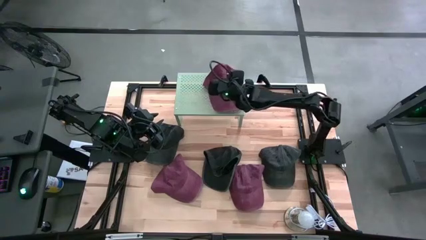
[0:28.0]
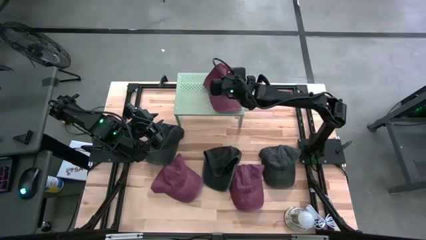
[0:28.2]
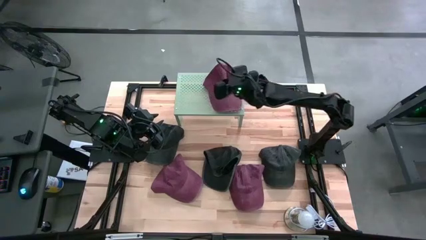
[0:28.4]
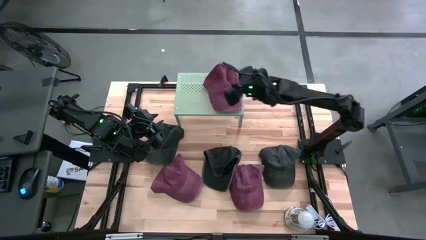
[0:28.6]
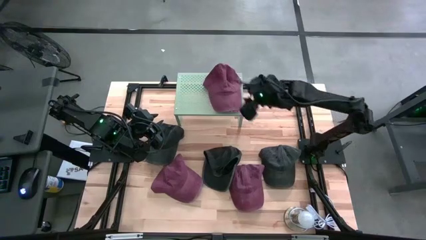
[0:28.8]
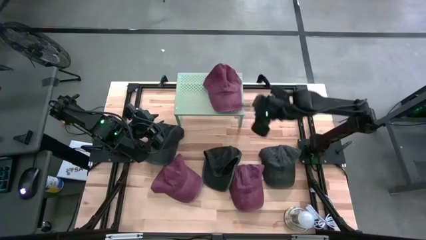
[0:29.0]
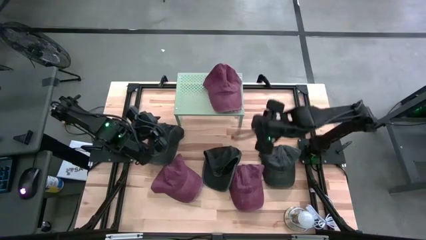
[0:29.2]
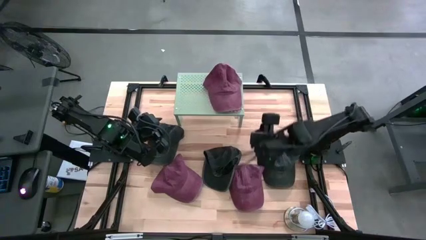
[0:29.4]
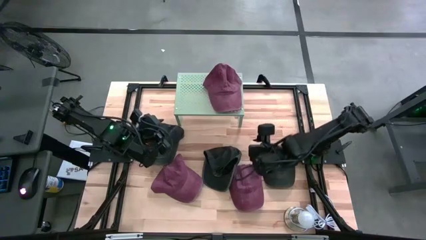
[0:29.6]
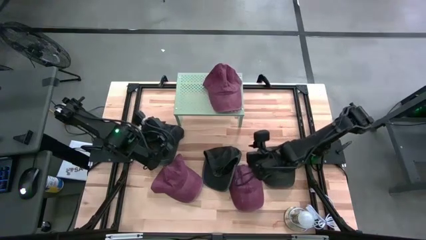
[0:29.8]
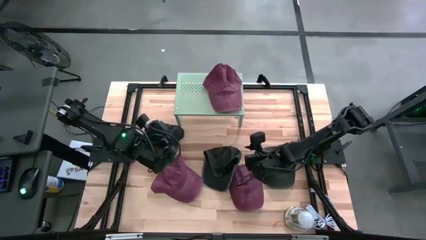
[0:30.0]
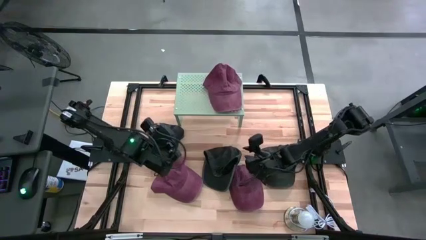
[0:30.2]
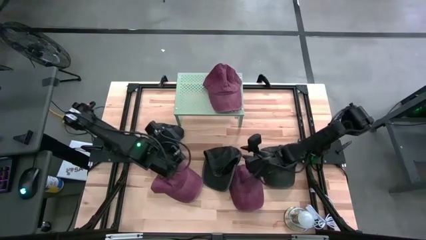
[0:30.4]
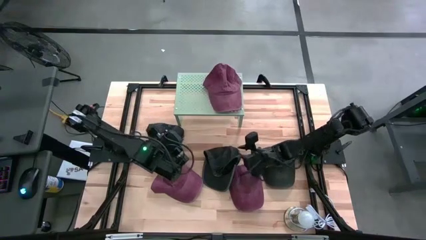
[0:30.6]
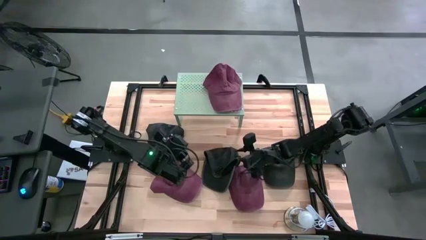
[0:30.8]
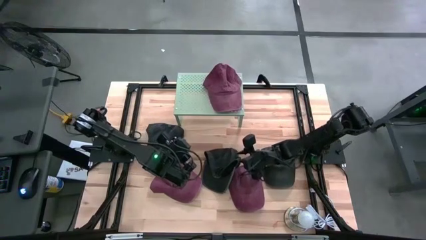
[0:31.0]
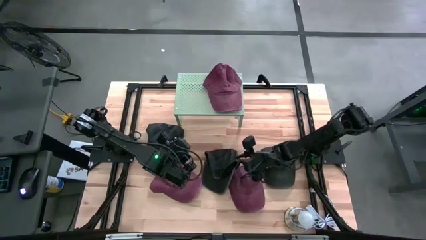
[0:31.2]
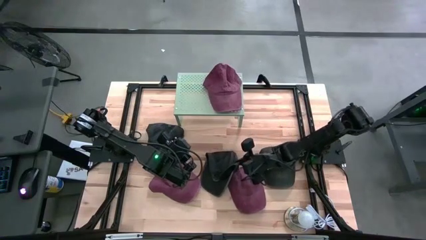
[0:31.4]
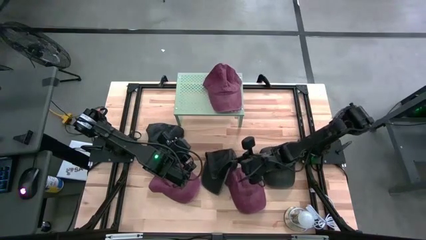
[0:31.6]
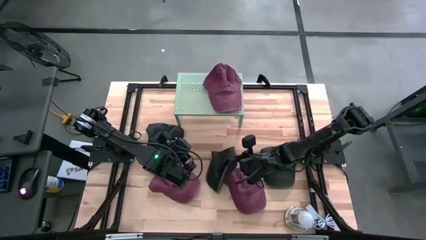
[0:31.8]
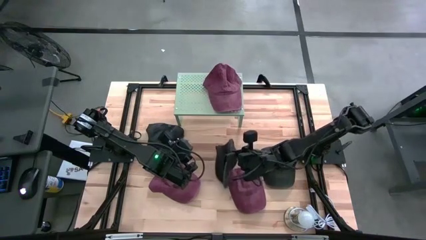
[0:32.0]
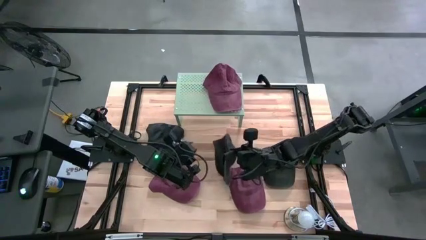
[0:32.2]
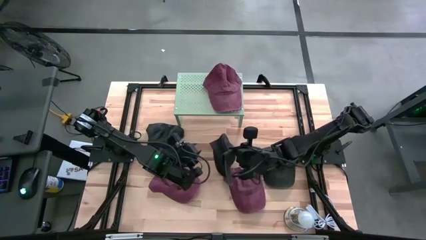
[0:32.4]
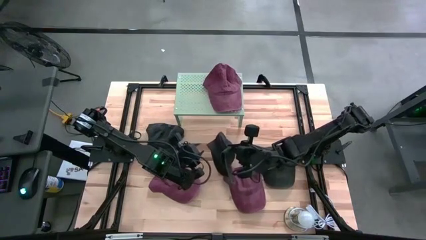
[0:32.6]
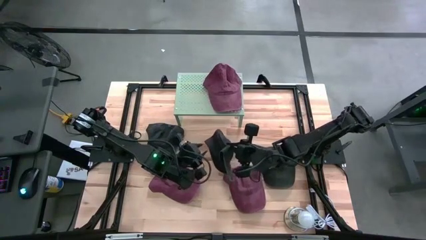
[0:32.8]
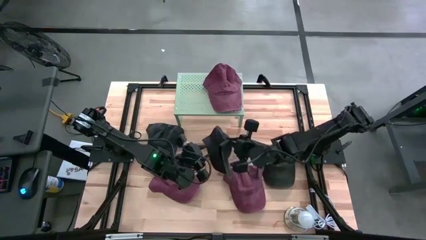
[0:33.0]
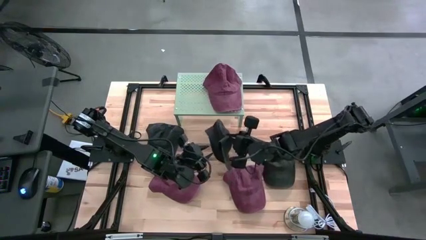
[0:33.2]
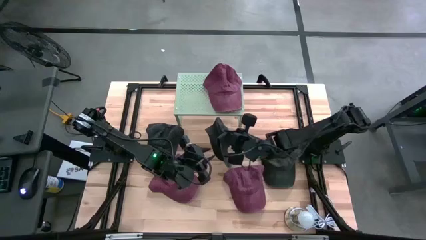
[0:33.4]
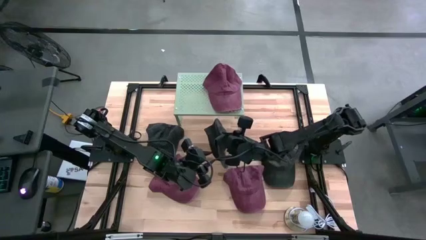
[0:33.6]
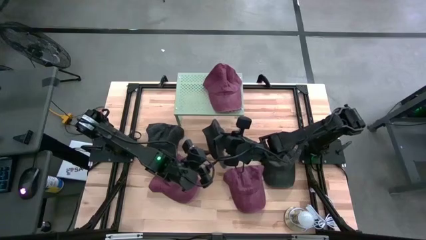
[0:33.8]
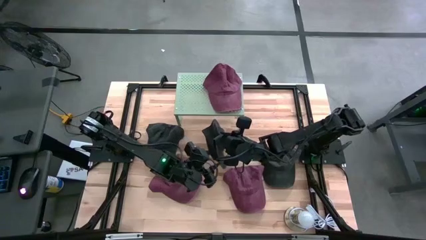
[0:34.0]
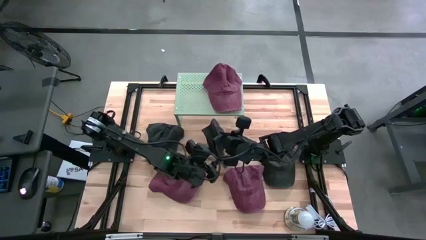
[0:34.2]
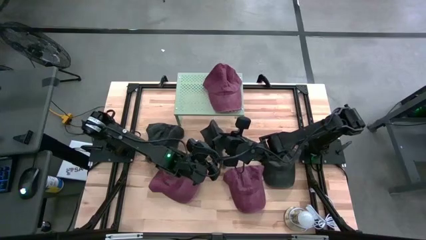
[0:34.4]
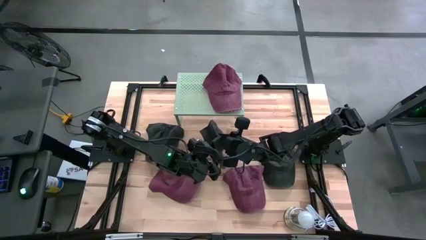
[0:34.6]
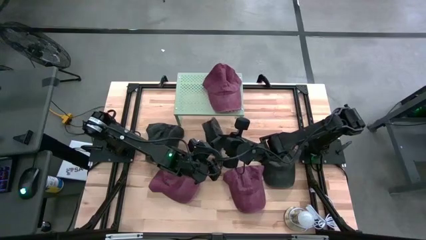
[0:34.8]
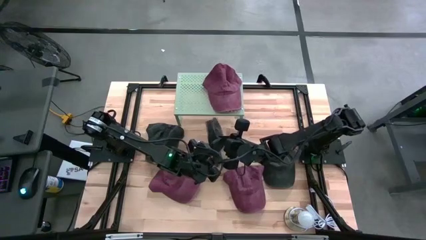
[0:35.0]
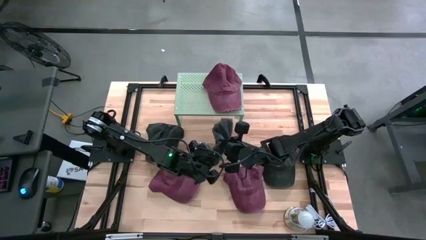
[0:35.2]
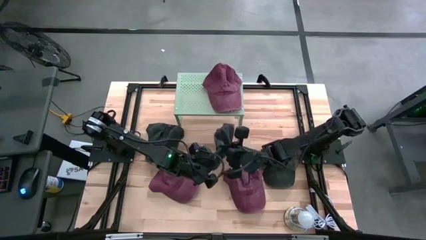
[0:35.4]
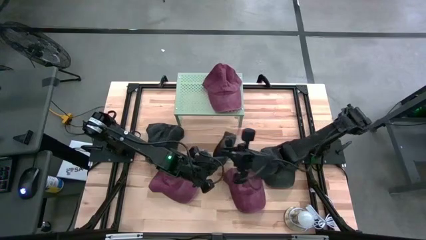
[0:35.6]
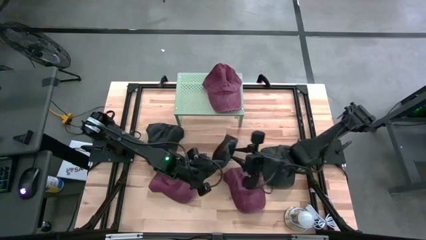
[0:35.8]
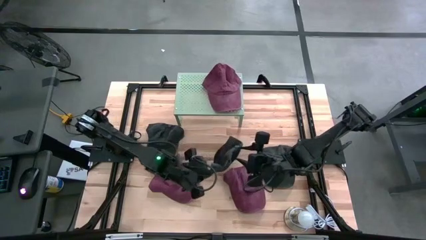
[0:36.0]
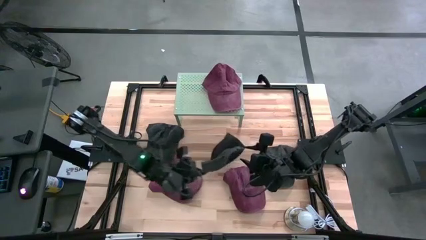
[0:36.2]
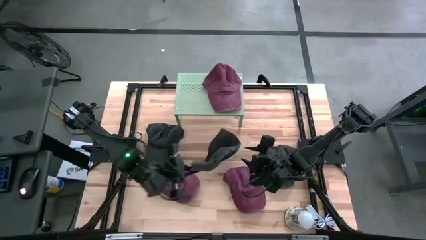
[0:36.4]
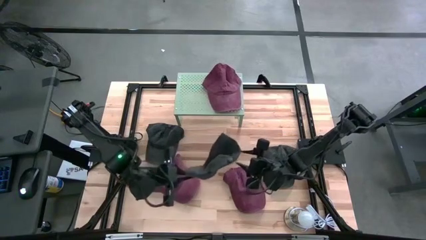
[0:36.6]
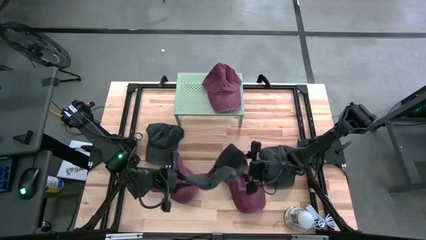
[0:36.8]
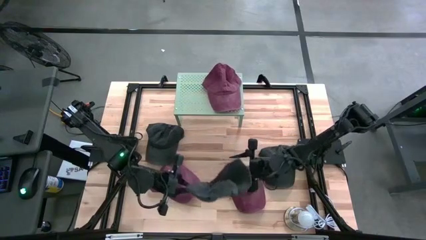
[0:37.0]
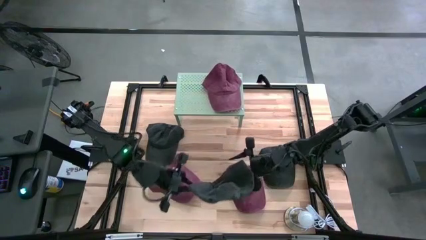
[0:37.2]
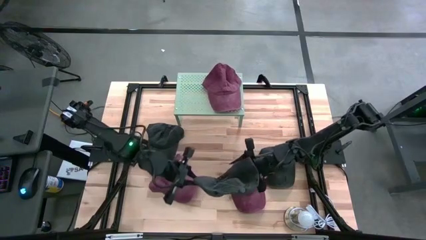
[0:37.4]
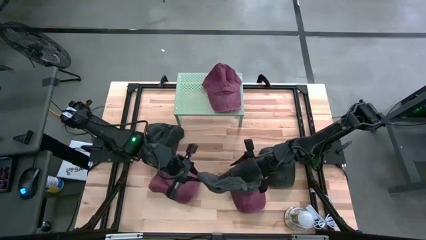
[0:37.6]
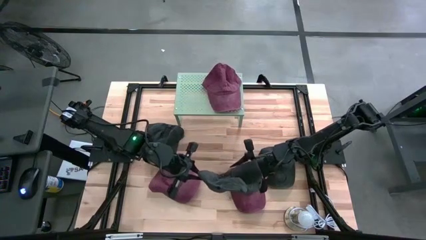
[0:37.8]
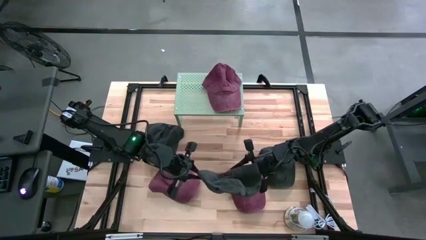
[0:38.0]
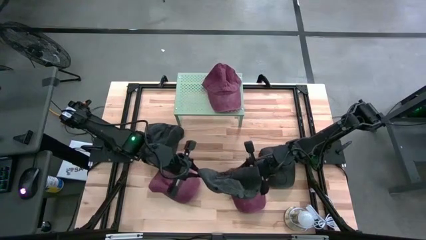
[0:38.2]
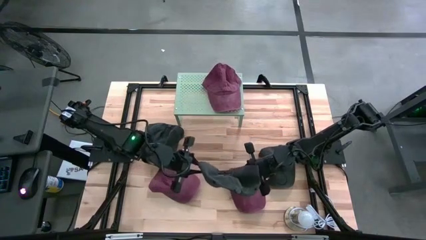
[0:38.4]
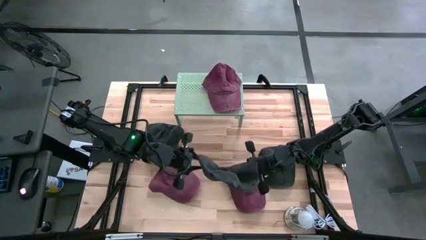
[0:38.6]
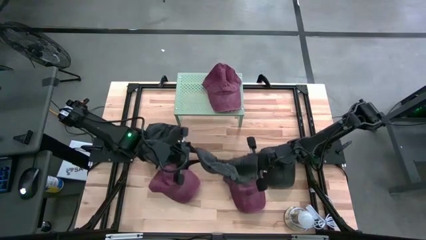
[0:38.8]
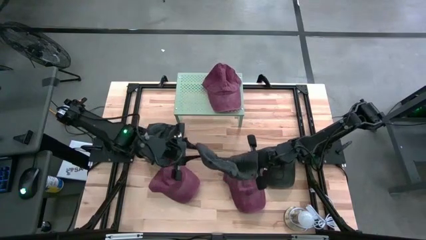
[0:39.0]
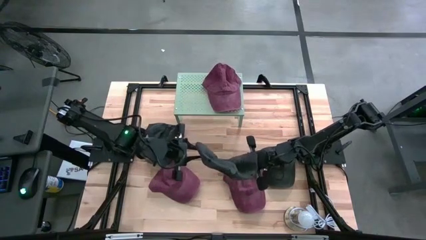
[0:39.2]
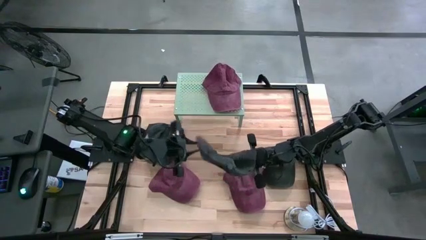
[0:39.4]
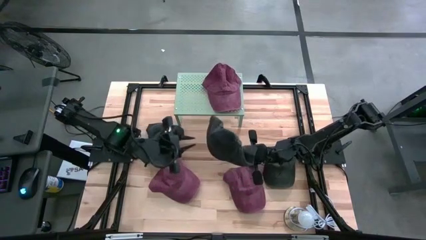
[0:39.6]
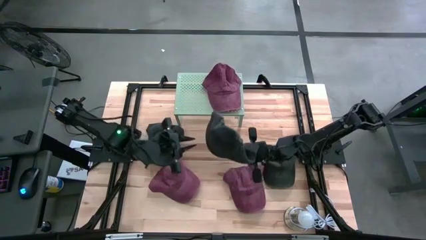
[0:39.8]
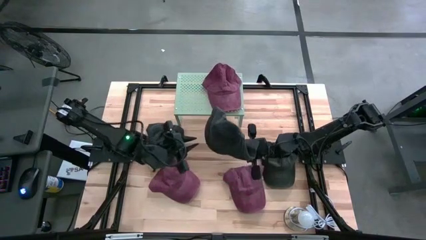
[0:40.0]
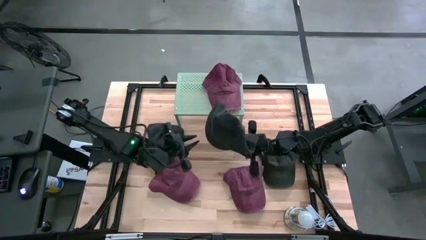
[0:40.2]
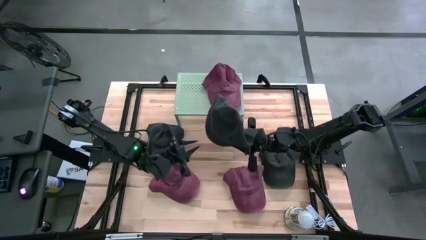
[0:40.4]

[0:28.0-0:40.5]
Task: Pick & Place hat
Put the center black cap on the left side of shelf

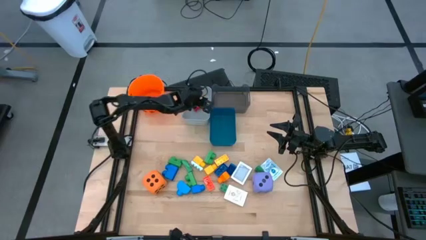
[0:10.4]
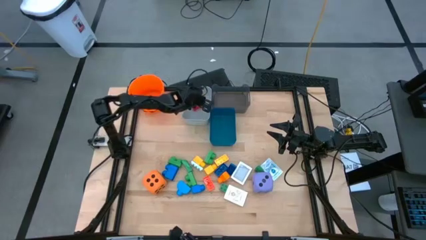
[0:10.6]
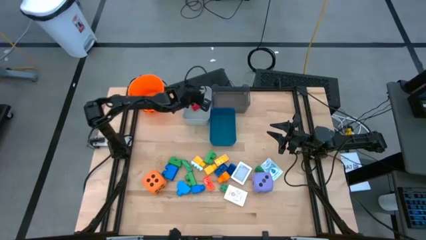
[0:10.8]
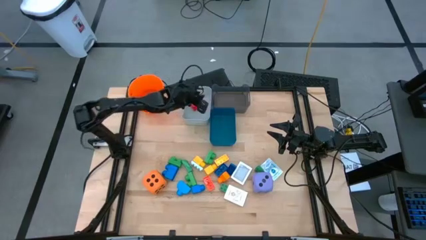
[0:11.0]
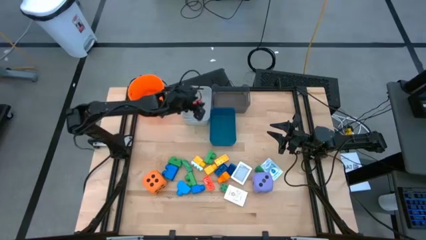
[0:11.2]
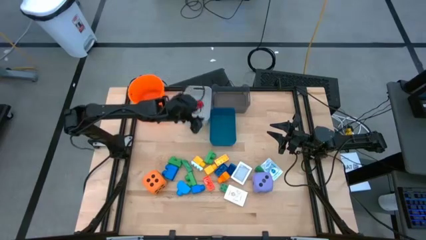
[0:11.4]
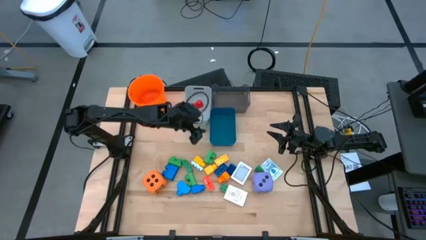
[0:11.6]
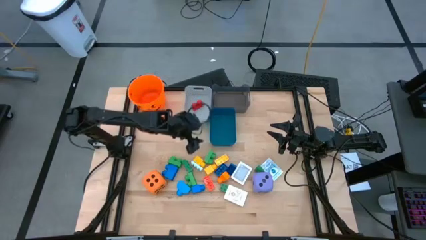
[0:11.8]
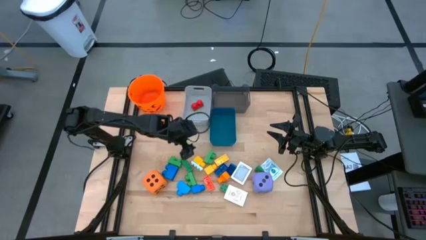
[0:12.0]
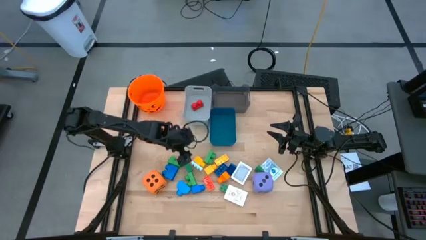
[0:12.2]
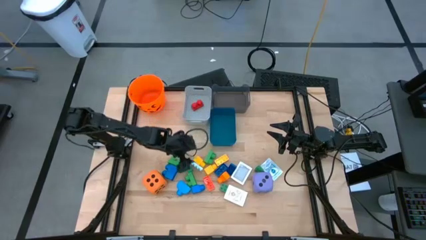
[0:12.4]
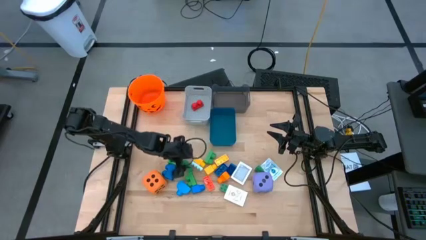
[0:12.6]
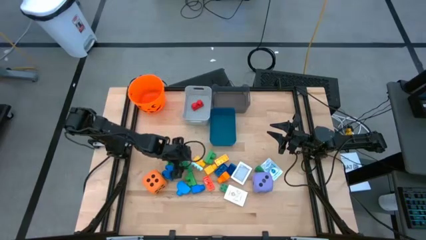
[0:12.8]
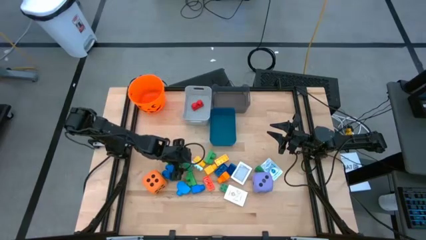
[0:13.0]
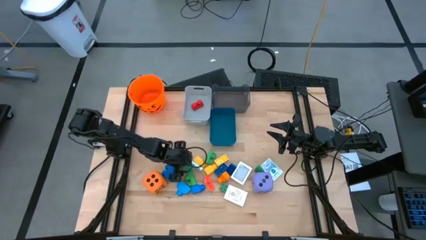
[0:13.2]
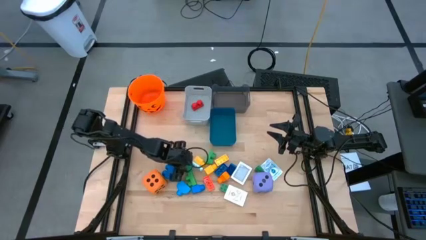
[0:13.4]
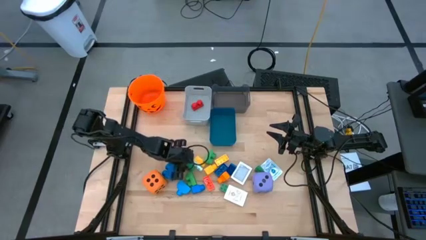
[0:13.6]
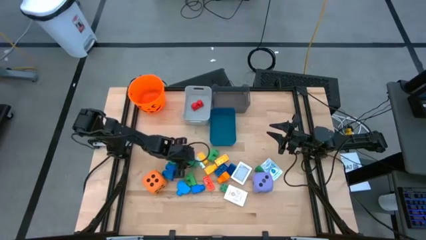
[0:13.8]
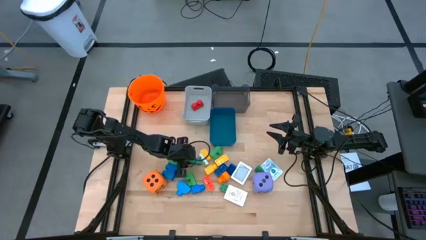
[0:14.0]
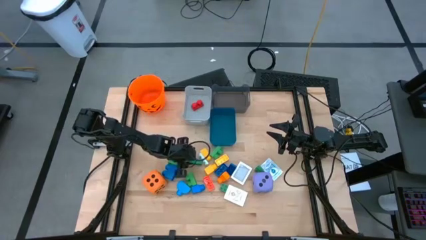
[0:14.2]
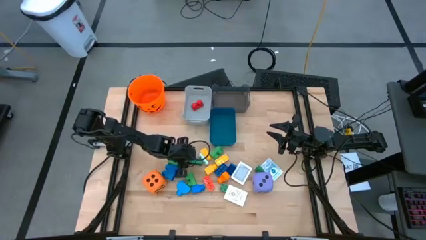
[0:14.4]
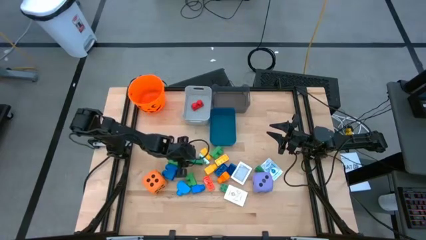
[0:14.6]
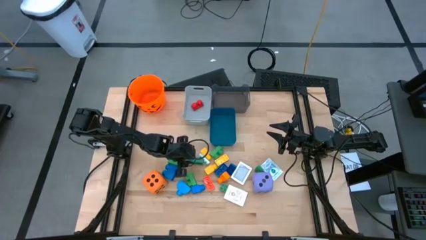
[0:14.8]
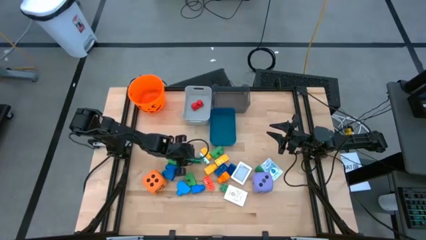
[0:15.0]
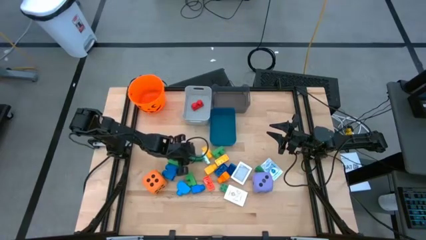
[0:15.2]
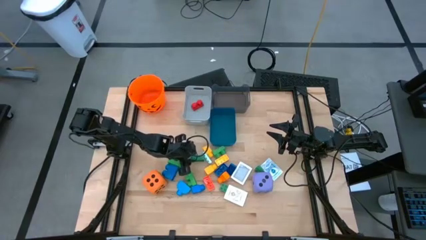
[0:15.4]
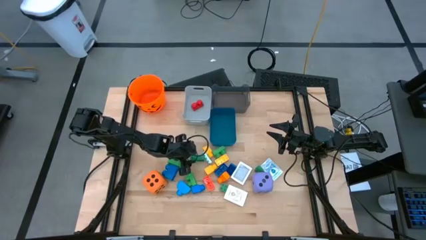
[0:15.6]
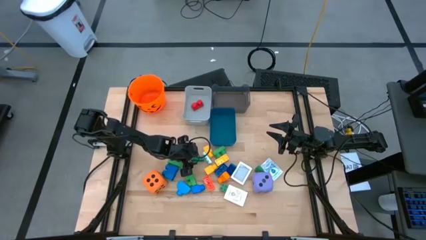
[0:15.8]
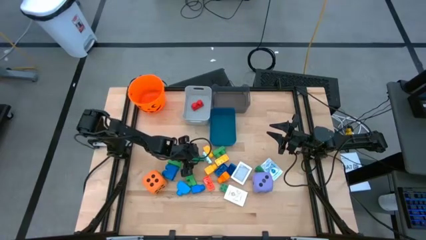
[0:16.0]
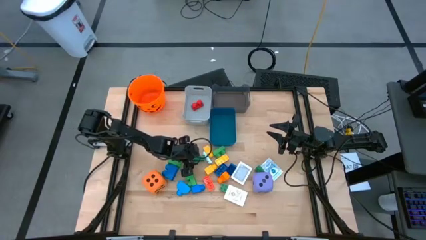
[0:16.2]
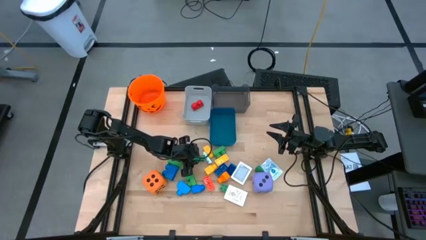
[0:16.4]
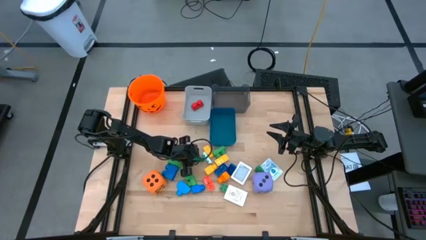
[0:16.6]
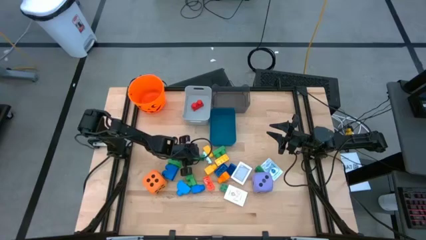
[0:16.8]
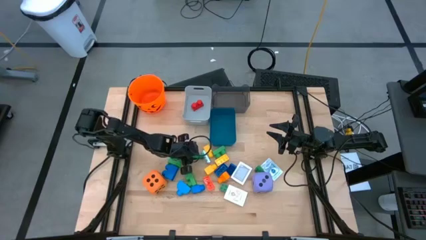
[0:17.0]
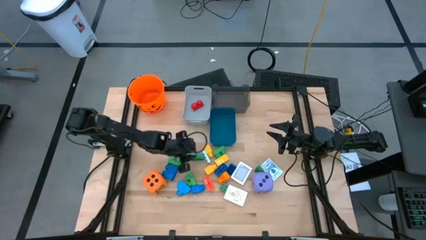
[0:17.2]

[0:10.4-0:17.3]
Task: Pick & Place Toys
Put the small green gamepiece into the white bin
